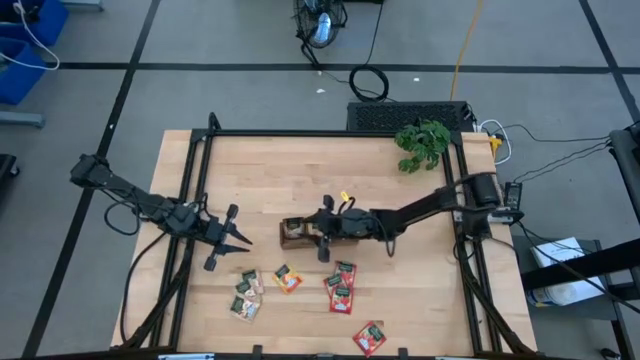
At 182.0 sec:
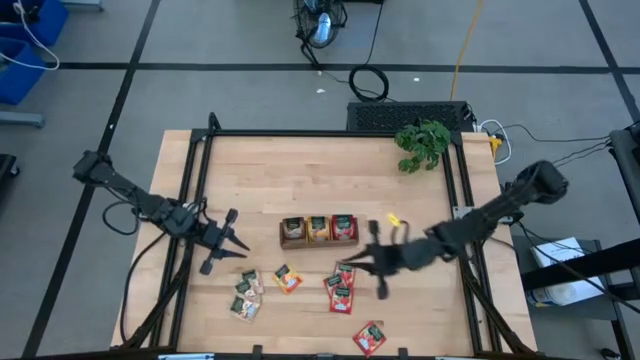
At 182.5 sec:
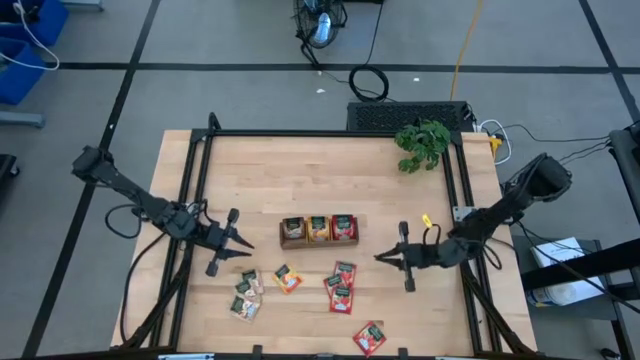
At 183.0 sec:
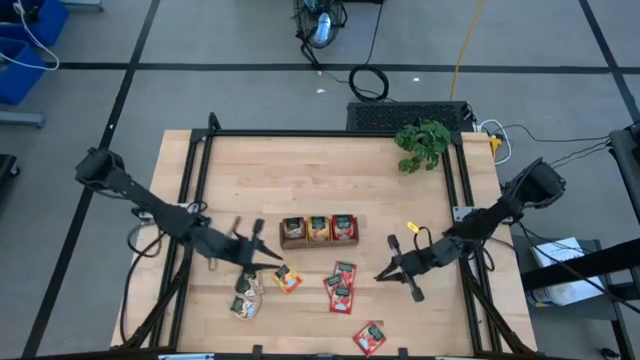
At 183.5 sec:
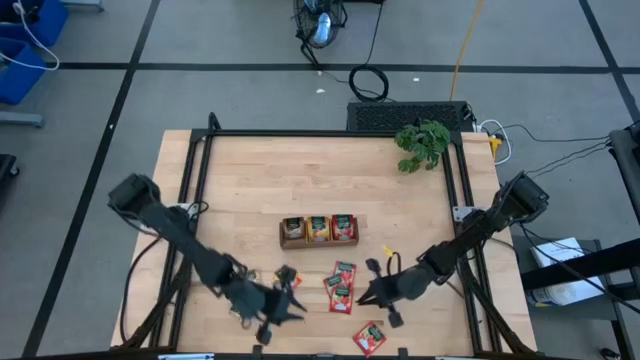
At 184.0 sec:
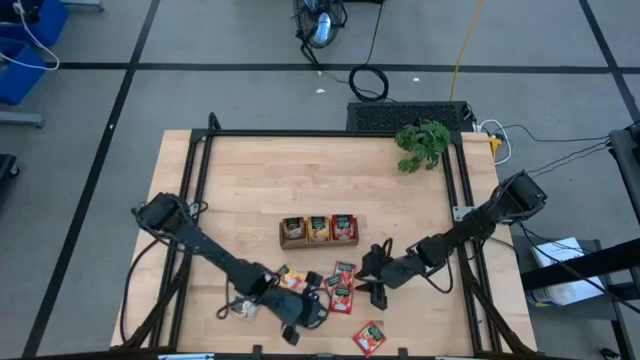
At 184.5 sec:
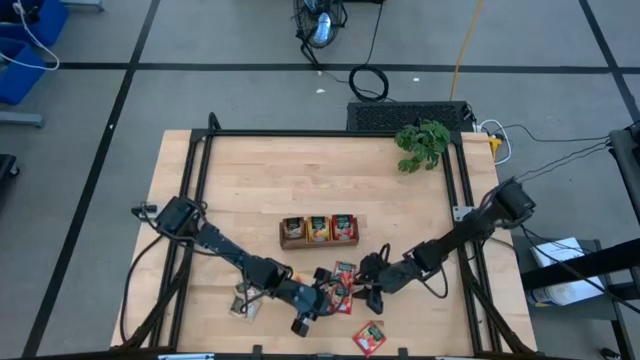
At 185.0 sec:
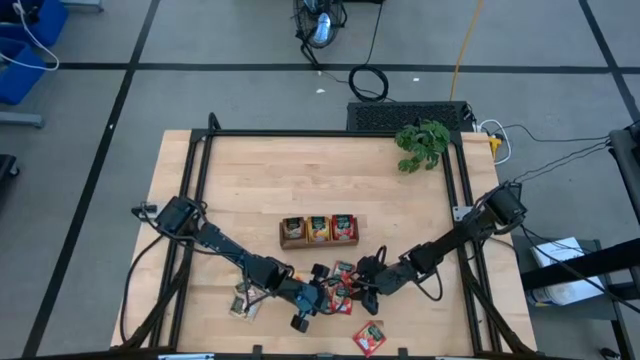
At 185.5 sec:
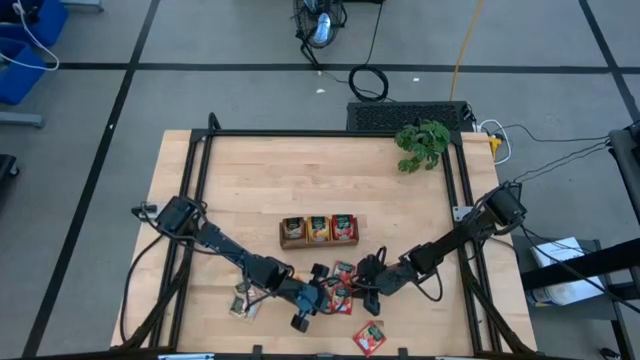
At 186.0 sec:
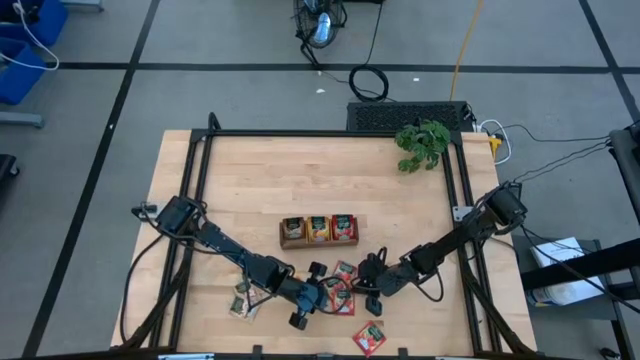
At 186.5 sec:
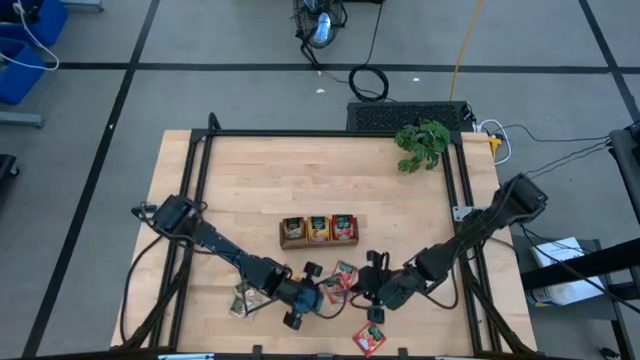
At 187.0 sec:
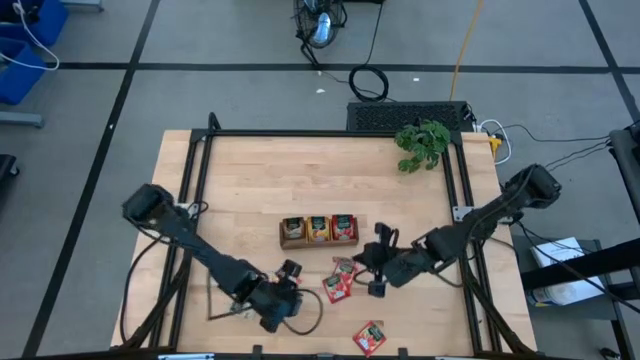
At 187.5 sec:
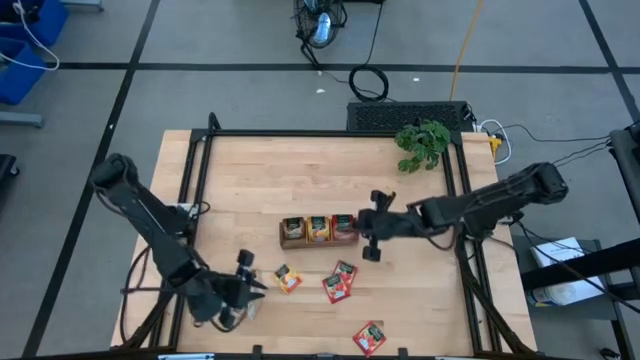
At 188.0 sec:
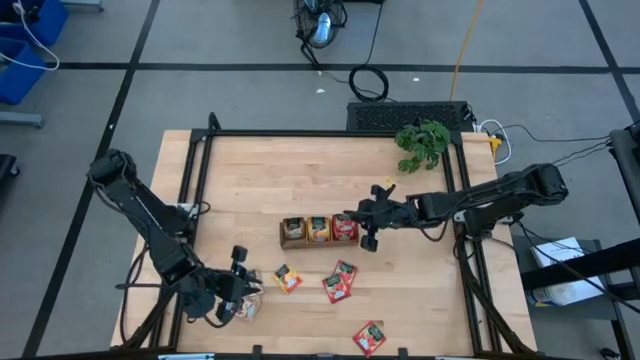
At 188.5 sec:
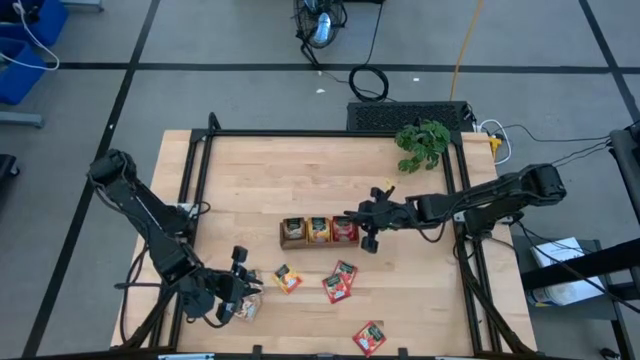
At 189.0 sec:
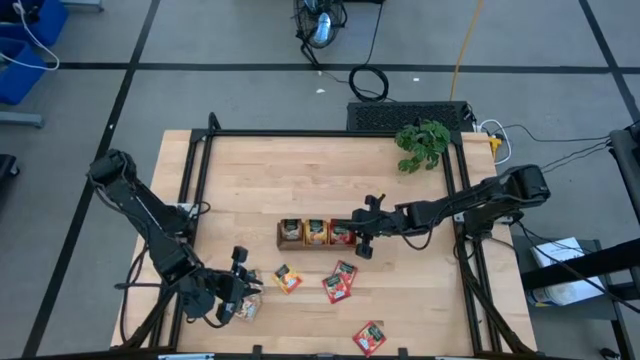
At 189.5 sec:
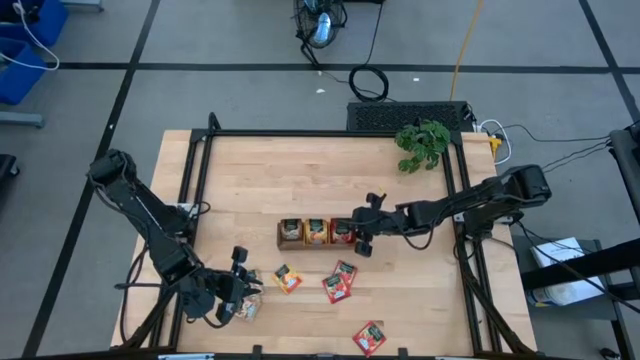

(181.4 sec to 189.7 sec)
Task: Pick & Place Tea
Put the red tea bag into the right section of the wooden organizer

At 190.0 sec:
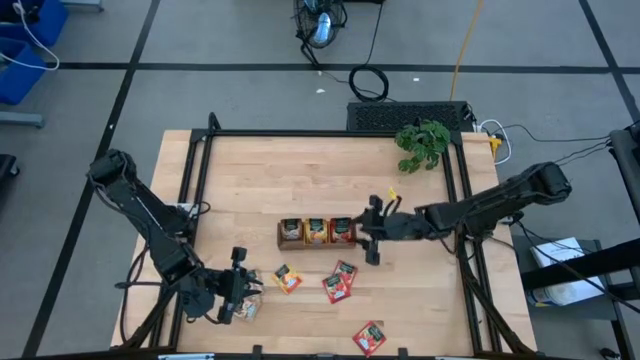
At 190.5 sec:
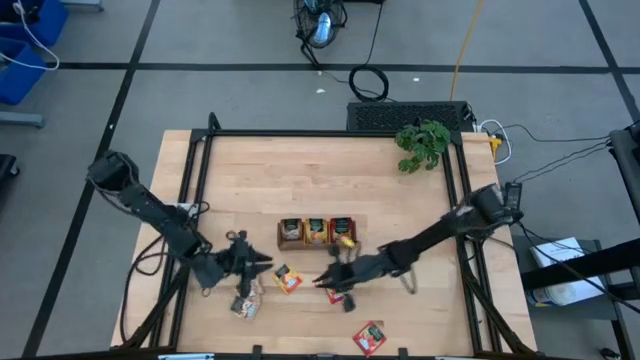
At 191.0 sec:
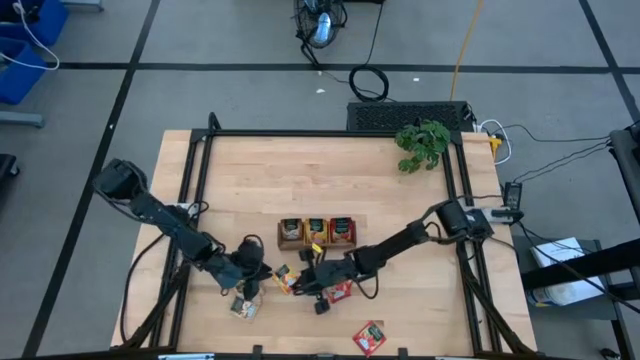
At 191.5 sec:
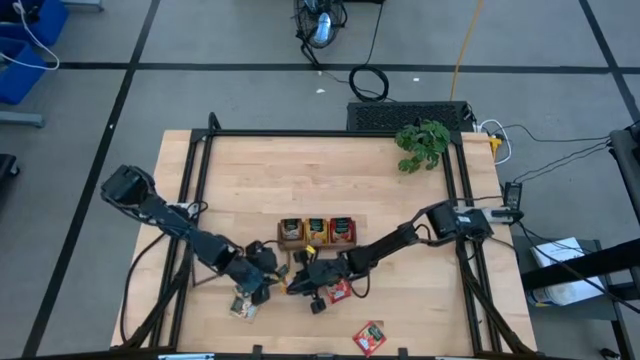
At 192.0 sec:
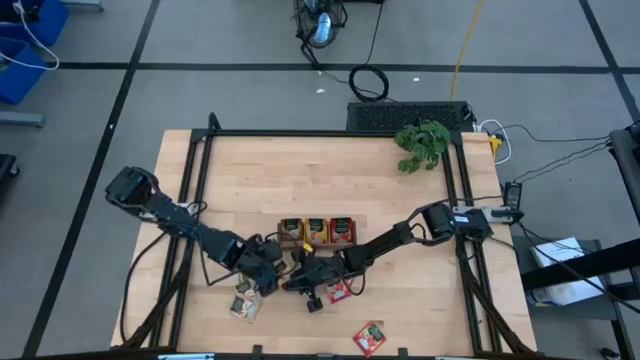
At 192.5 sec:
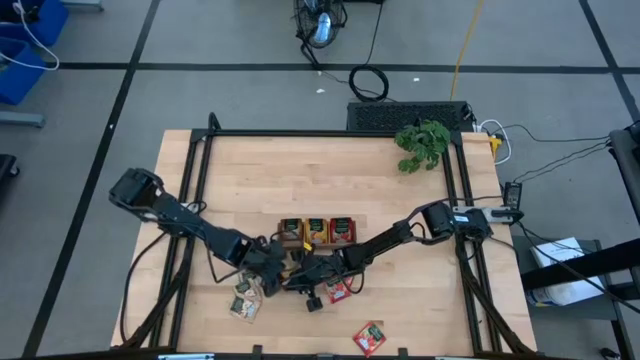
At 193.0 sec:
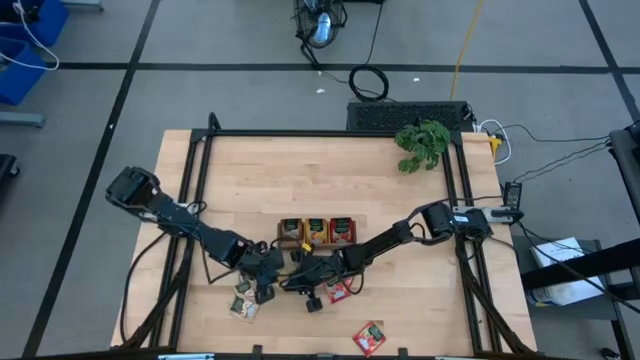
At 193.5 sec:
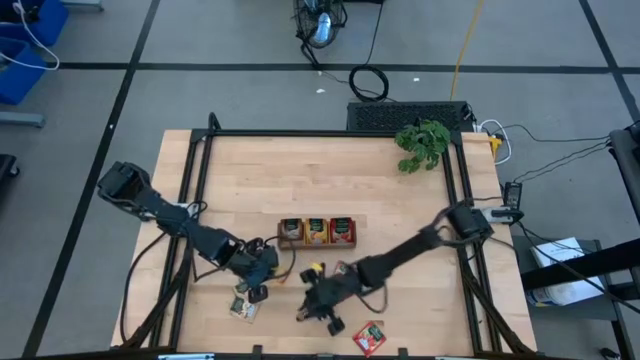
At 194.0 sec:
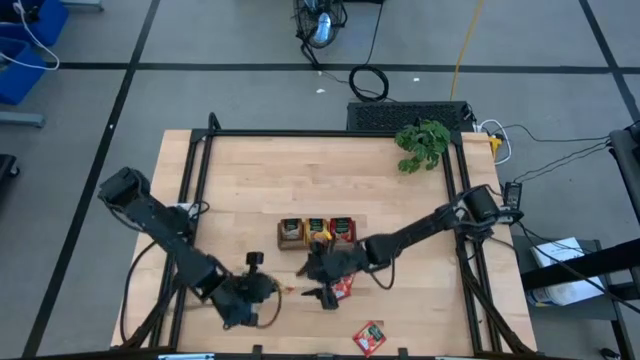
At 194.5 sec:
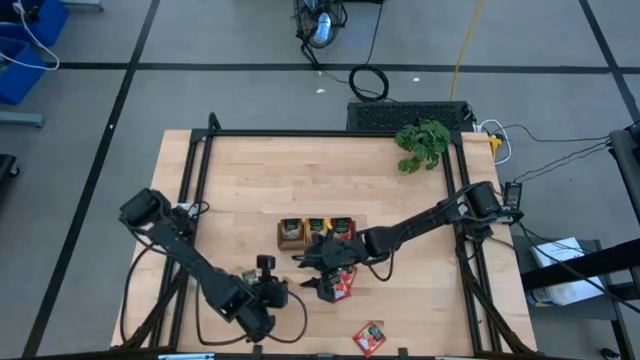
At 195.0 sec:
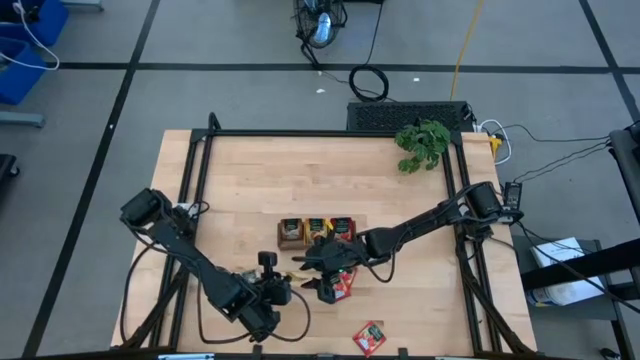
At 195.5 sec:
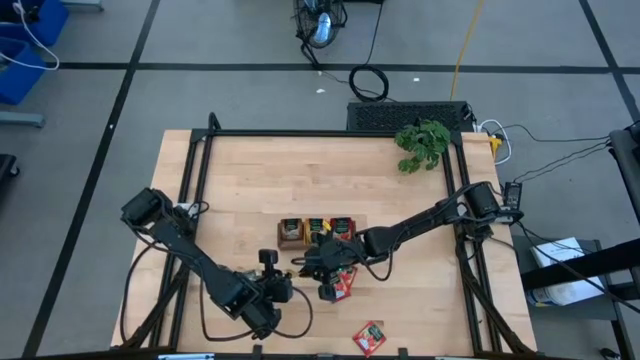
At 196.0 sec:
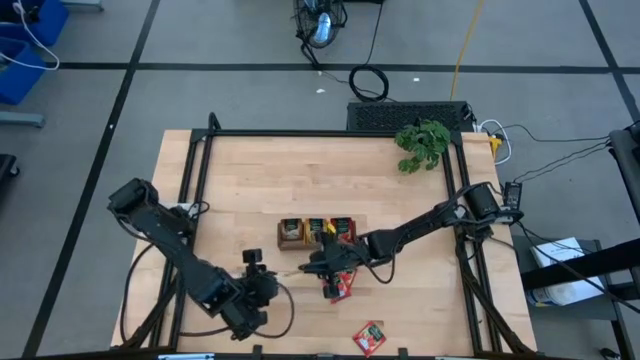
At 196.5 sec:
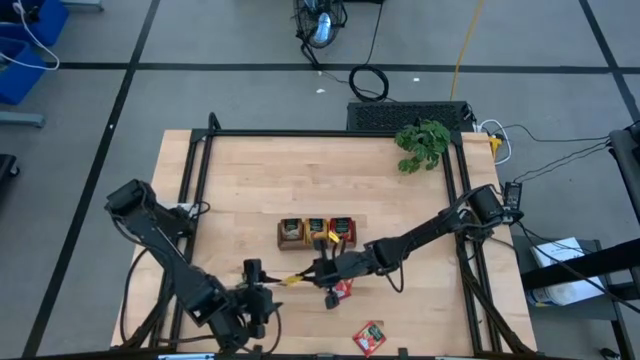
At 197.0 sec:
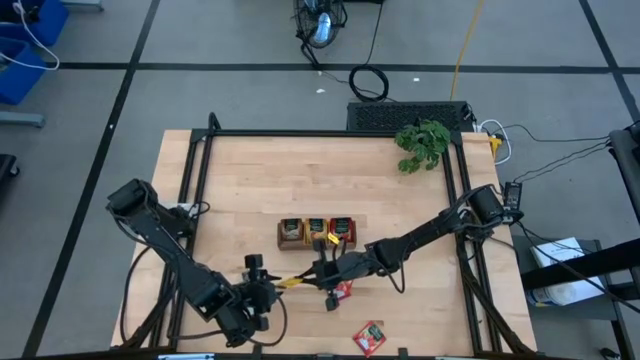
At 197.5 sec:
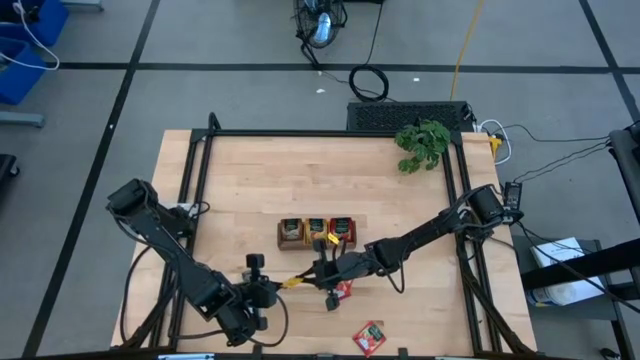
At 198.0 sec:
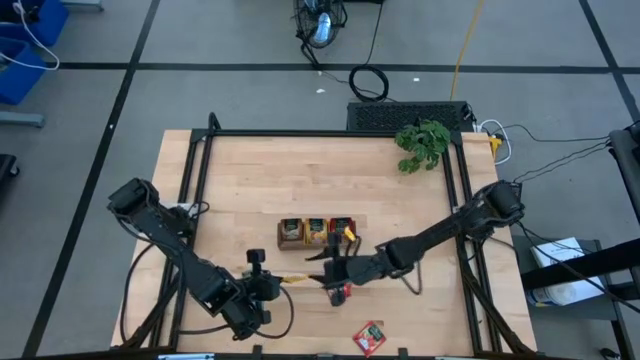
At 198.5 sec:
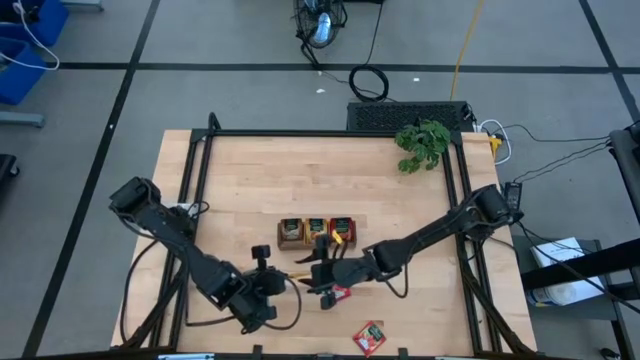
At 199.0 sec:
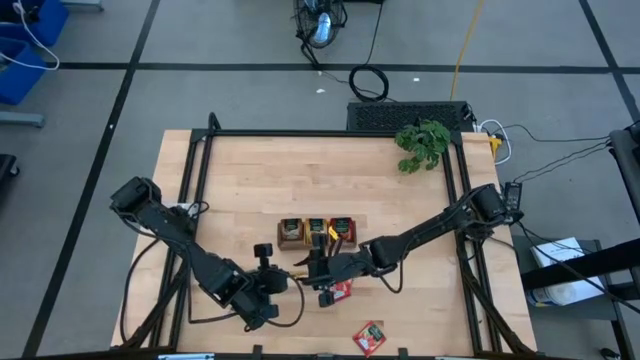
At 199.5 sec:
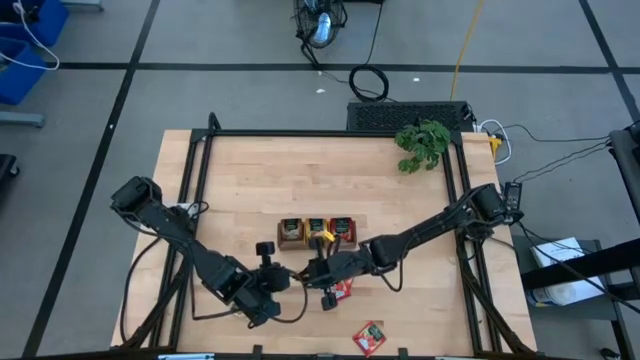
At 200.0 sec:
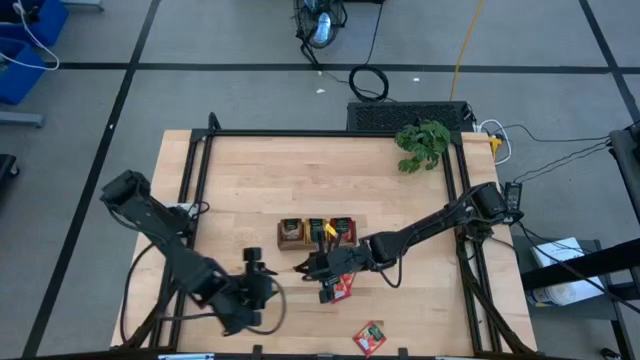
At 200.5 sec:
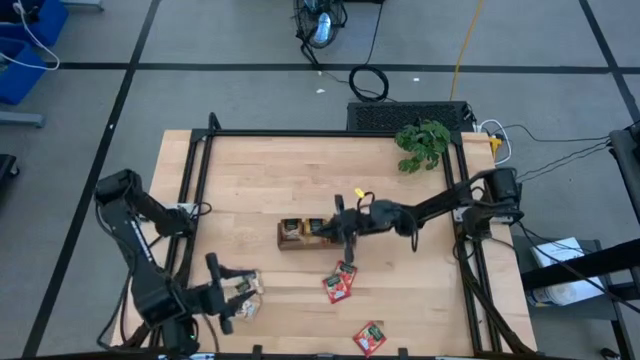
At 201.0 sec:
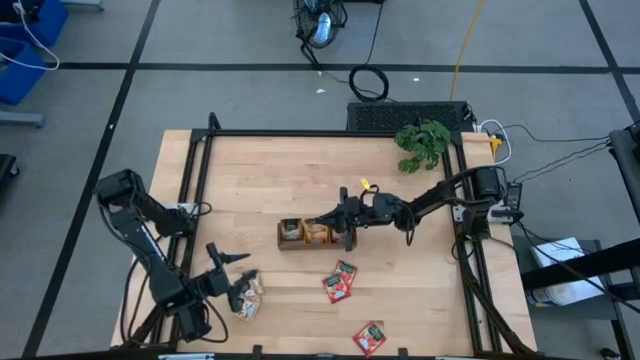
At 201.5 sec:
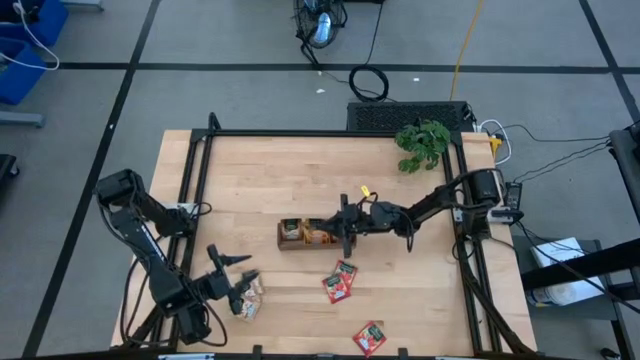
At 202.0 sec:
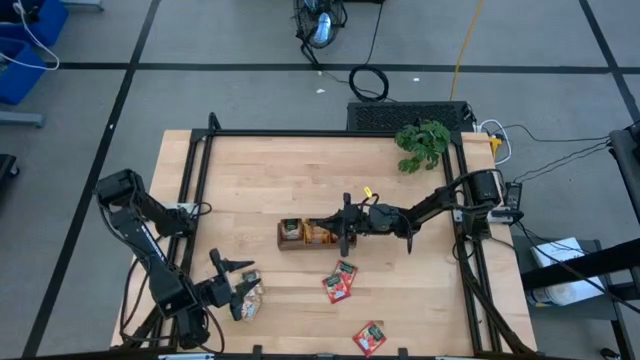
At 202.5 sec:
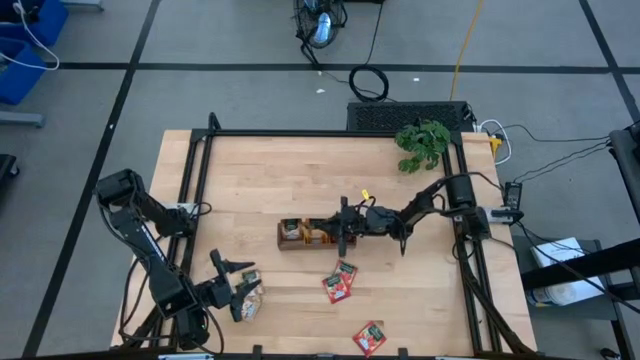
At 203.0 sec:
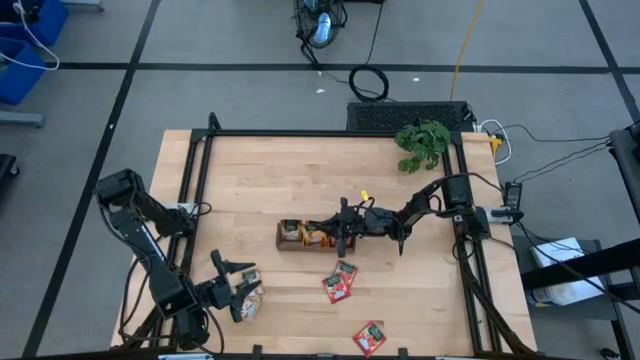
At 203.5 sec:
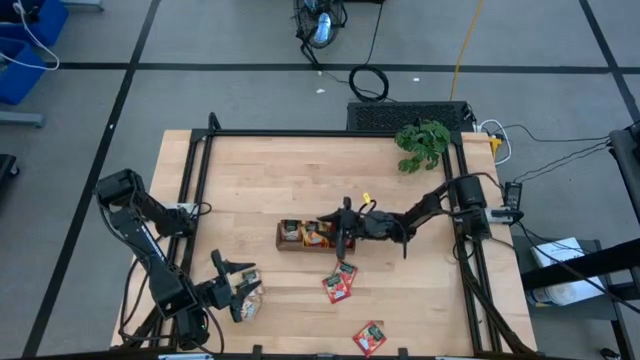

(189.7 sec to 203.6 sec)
Put the yellow tea bag into the middle section of the wooden organizer
